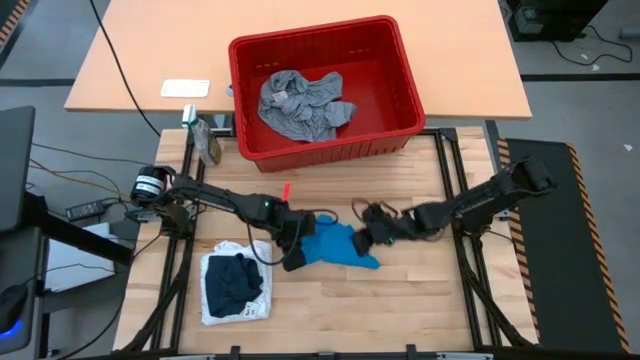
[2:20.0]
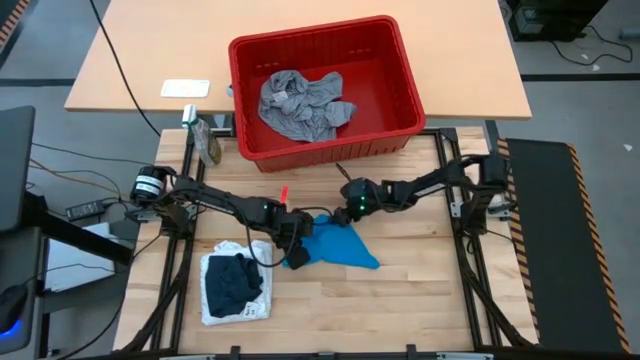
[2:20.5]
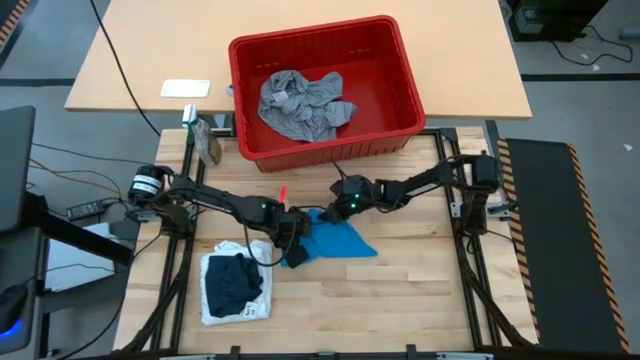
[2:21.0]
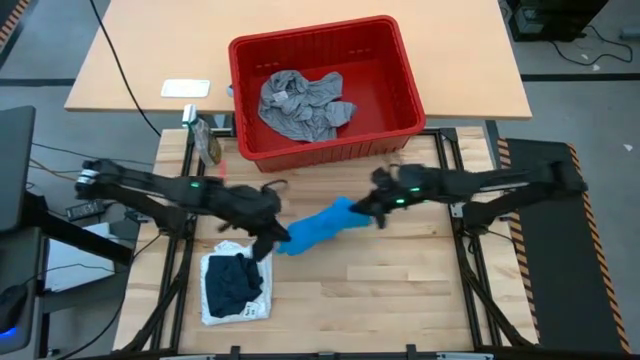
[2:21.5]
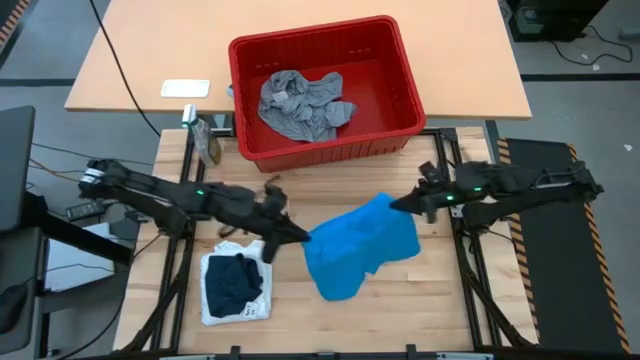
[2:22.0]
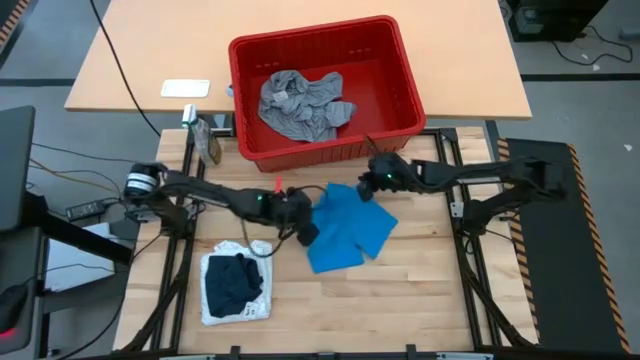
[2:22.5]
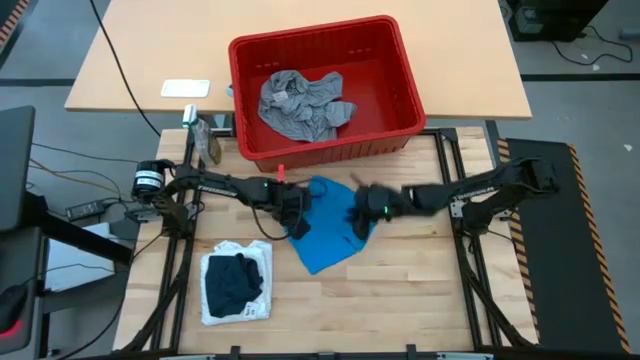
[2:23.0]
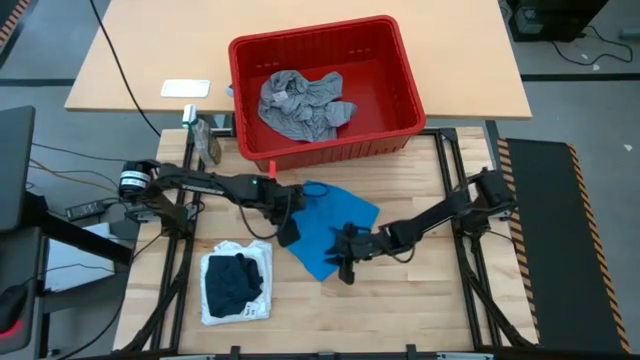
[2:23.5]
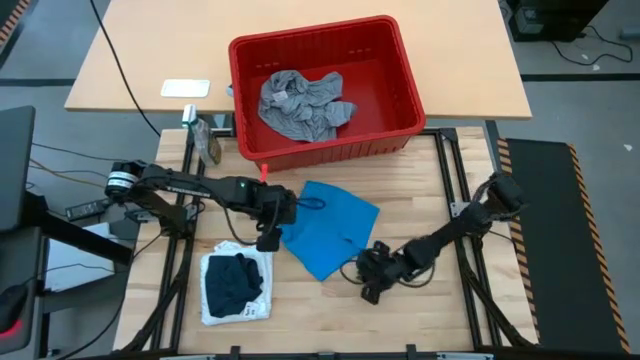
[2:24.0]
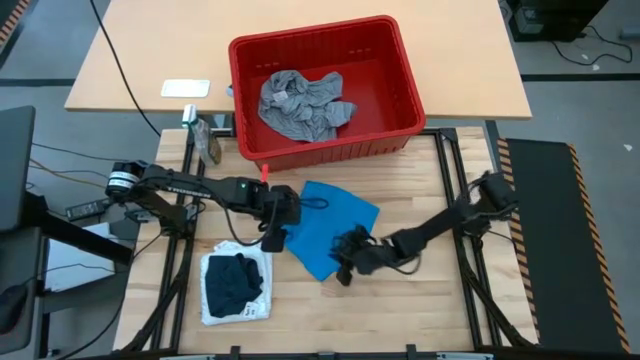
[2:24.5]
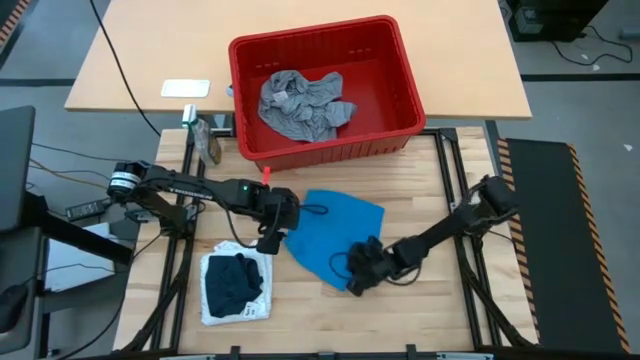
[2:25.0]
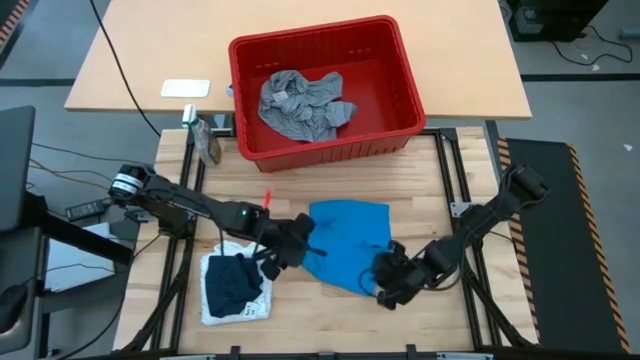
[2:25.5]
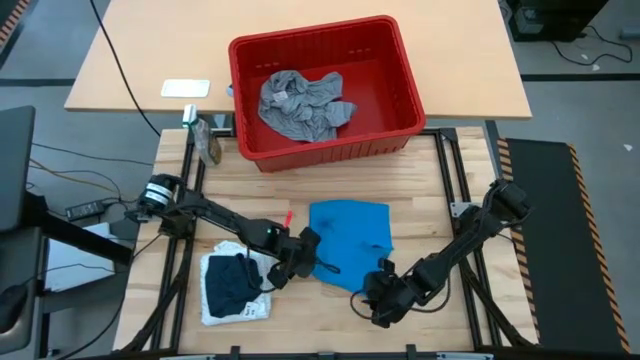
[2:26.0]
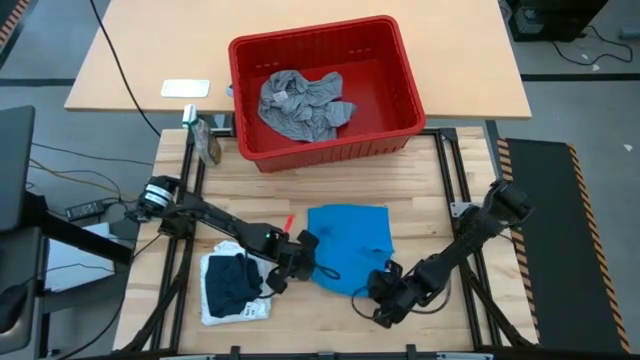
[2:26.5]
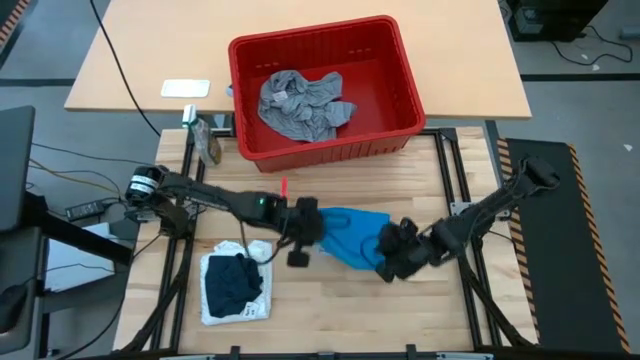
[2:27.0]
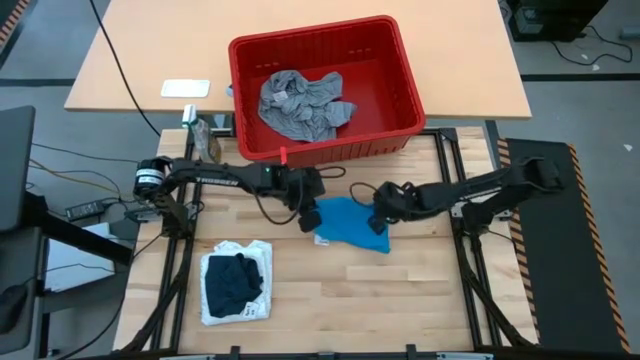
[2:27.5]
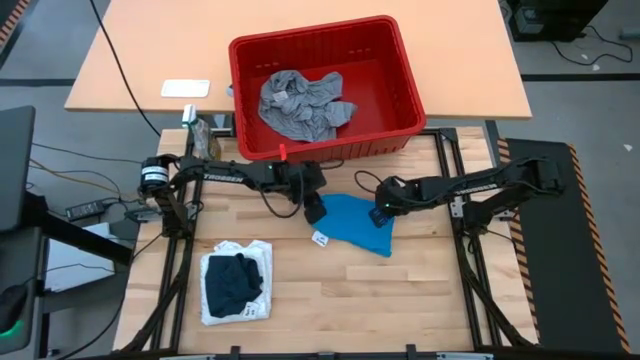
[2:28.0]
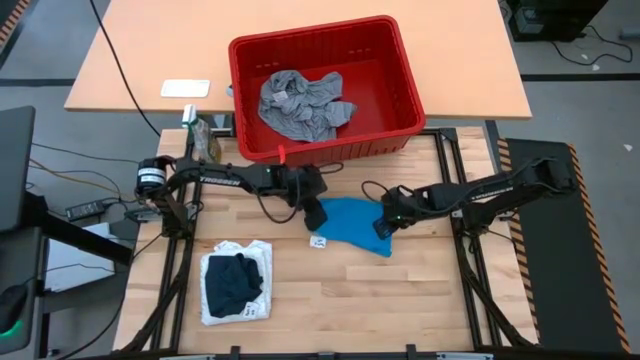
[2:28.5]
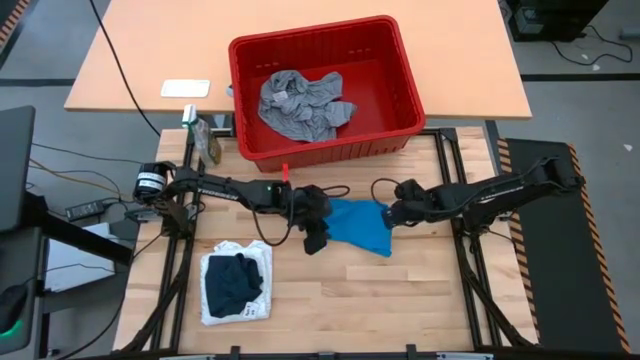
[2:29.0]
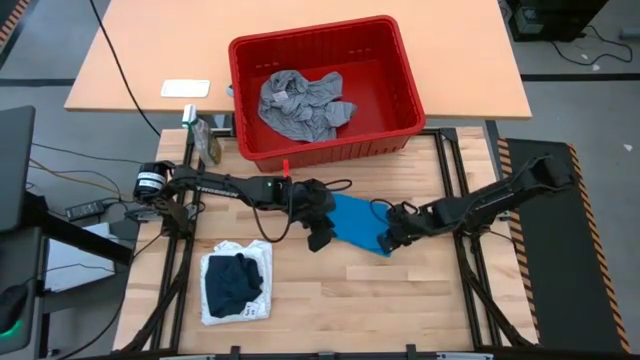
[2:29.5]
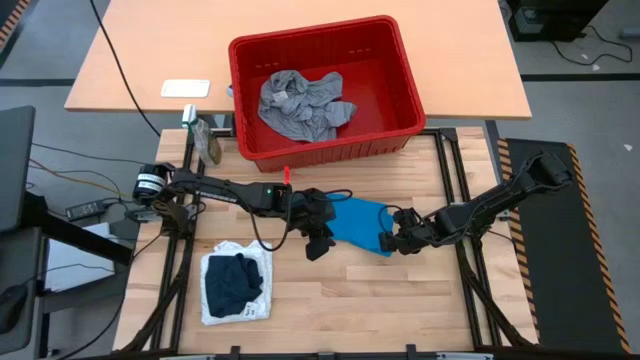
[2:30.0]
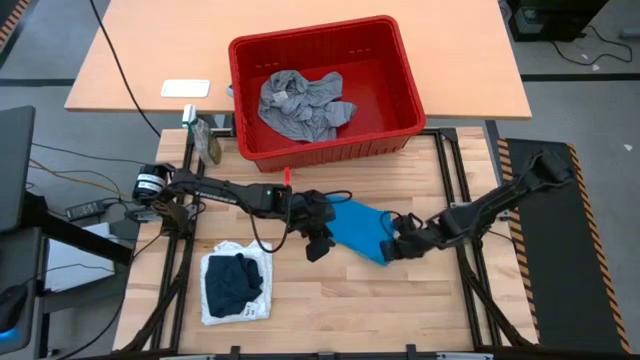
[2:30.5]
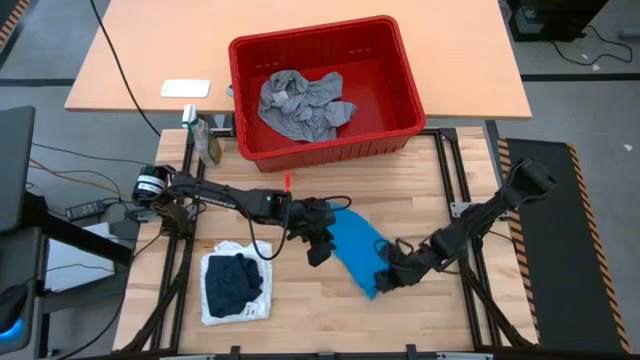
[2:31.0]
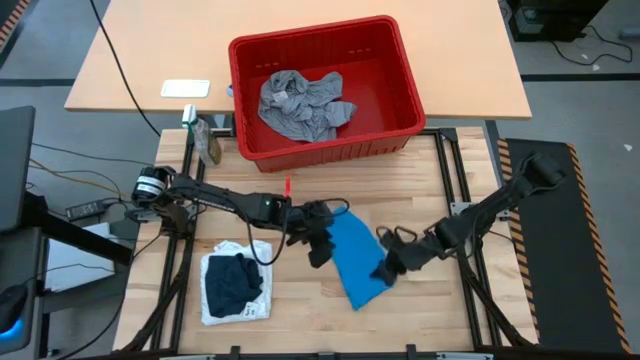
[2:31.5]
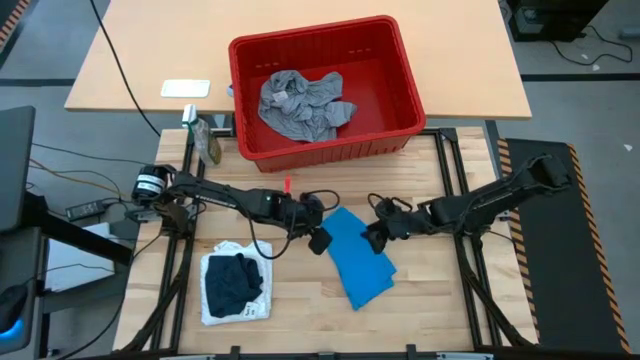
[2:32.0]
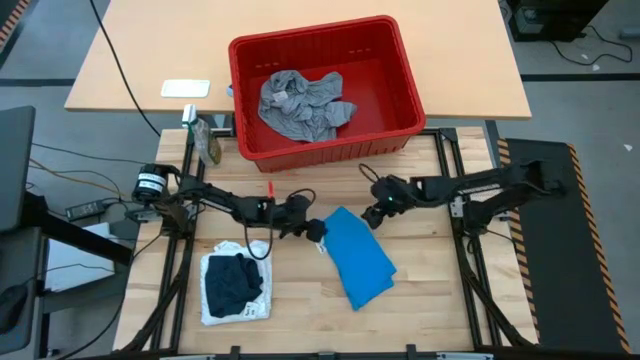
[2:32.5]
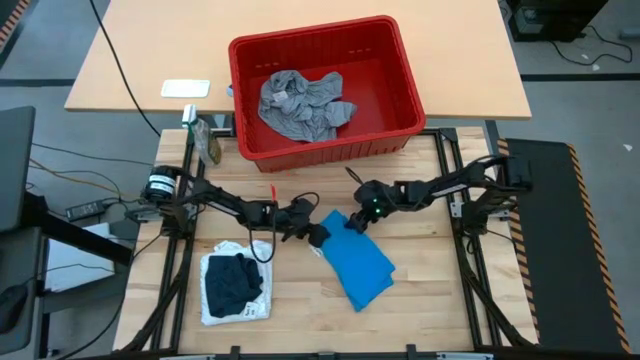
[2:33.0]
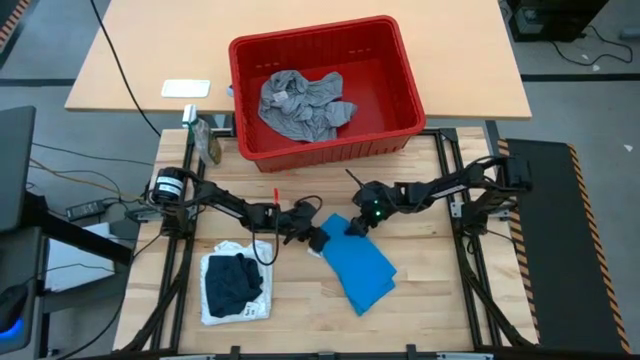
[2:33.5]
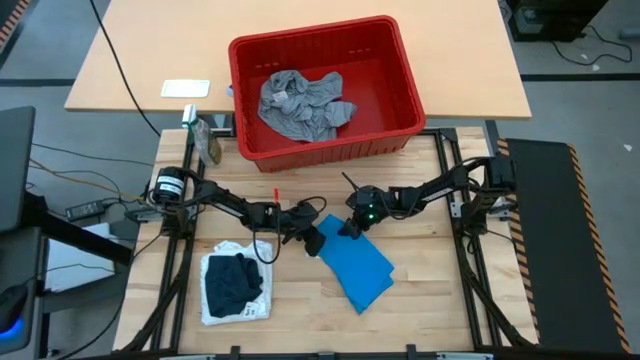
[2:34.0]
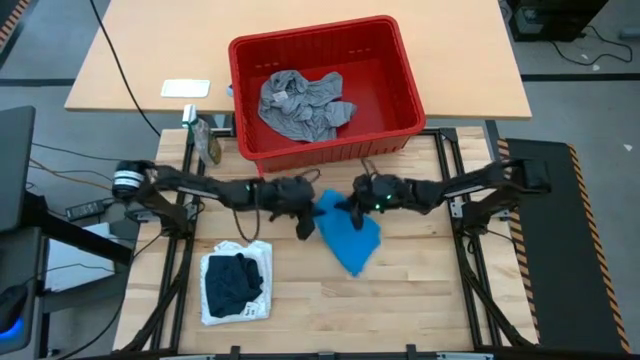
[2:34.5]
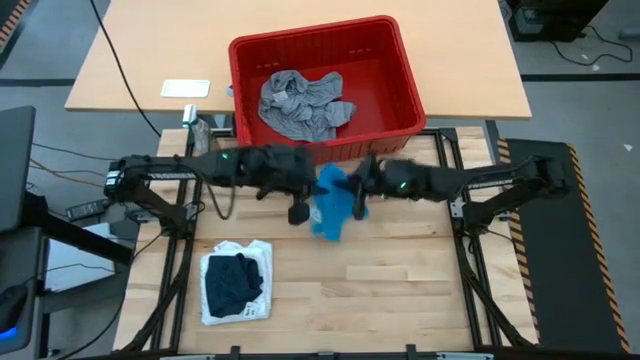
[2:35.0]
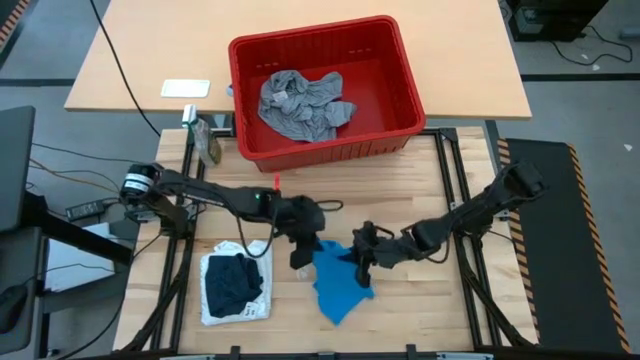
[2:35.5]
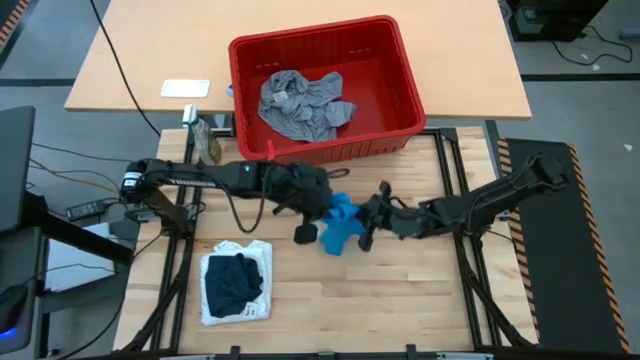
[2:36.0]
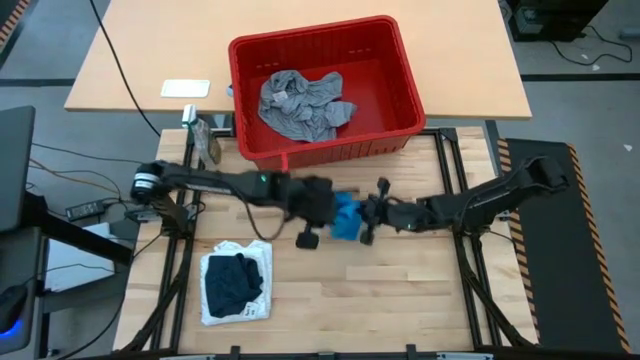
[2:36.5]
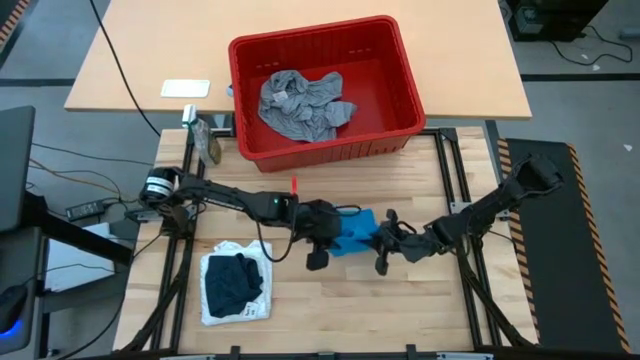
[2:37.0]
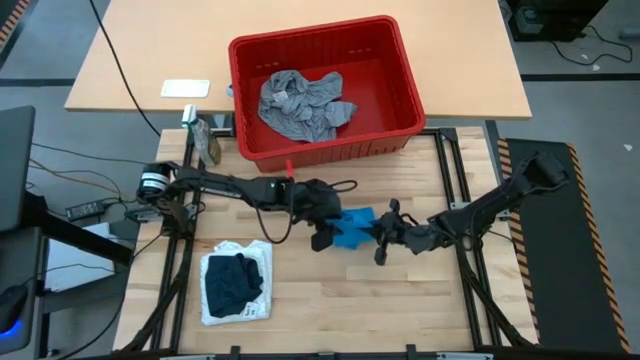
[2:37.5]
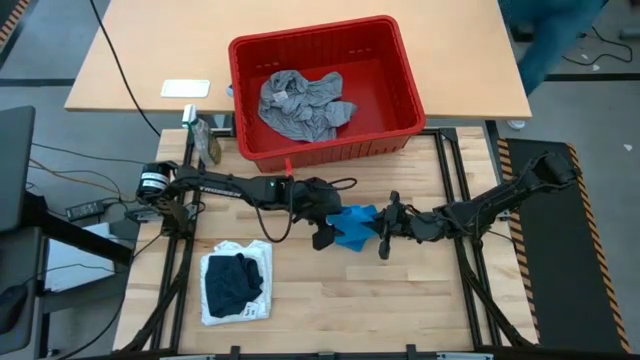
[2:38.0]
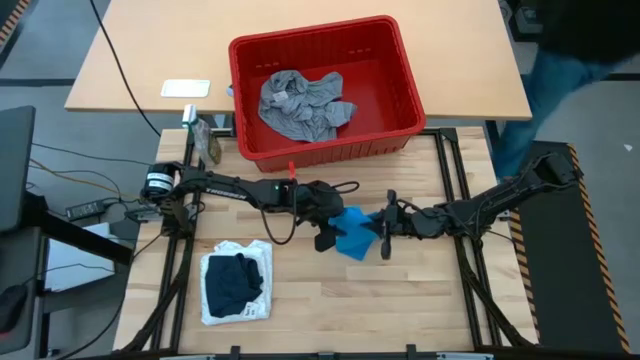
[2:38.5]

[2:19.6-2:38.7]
Task: Fold laundry
Fold the light blue shorts

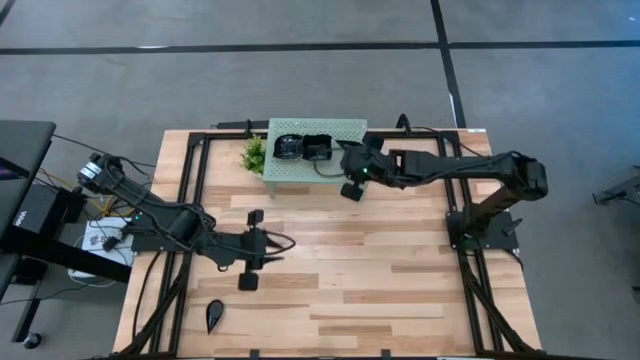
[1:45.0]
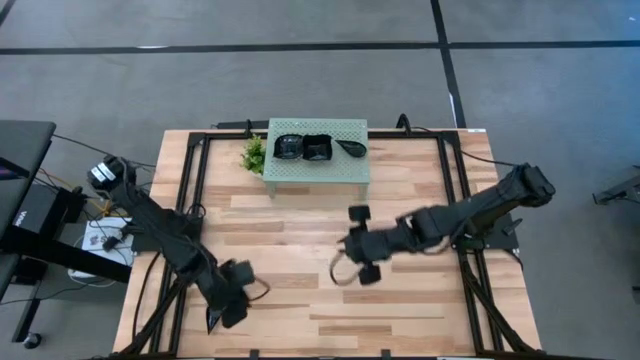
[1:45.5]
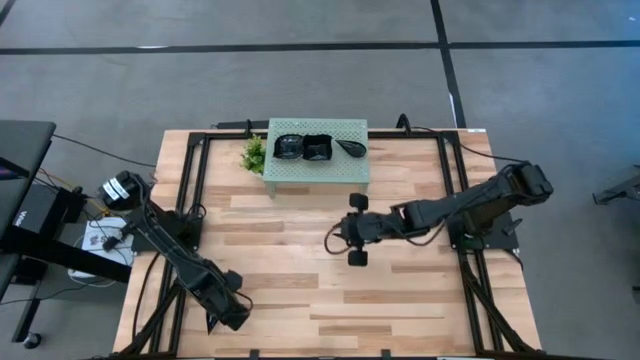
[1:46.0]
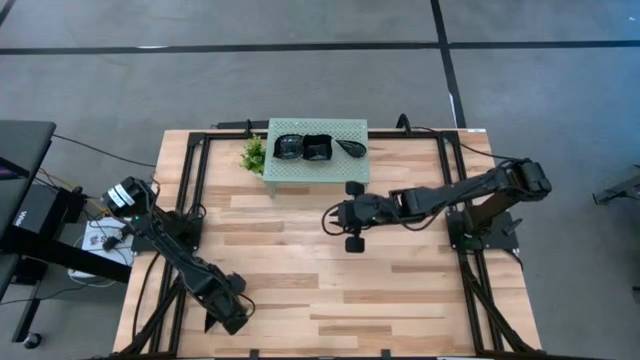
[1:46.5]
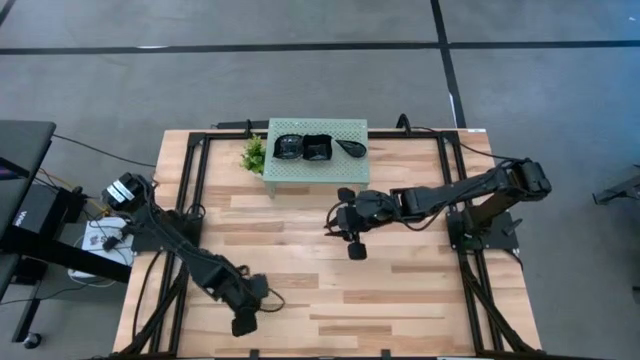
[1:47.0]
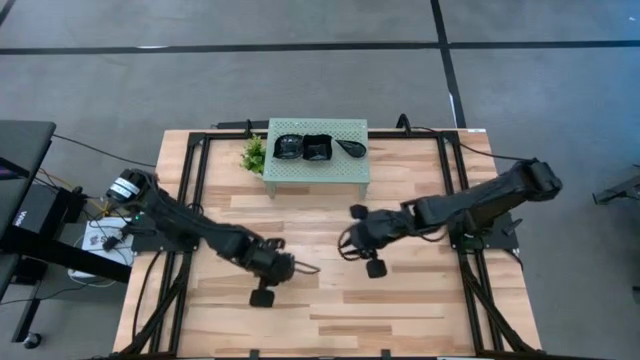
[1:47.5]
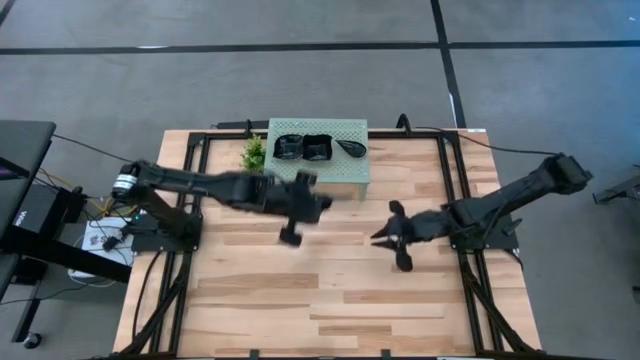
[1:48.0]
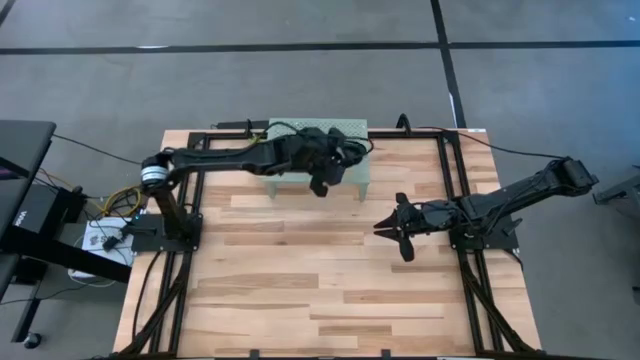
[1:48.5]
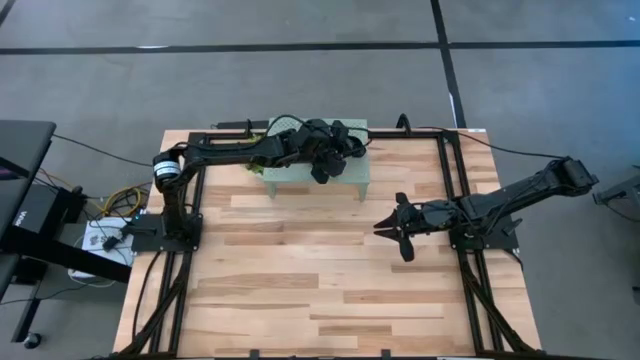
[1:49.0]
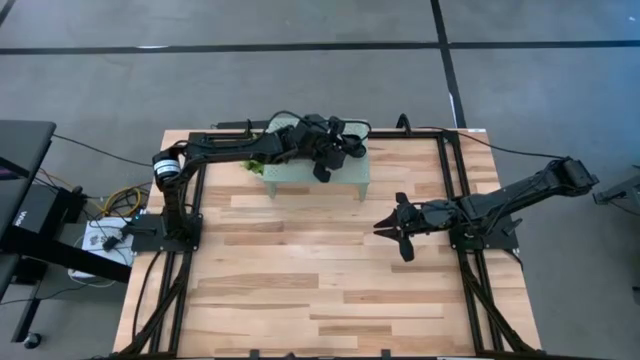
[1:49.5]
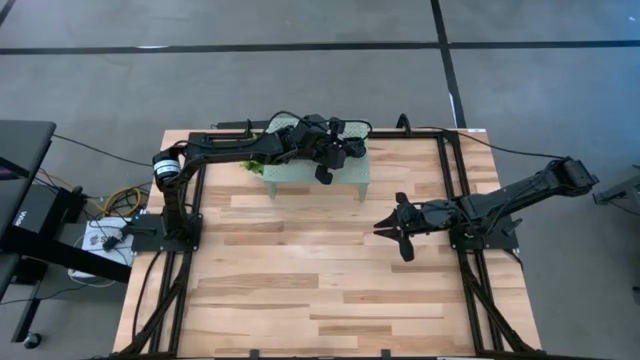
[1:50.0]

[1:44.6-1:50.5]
Task: Pick & Place Mini shaped plates
Stack the drop-shaped plate on top of the other drop-shaped plates on the shelf
